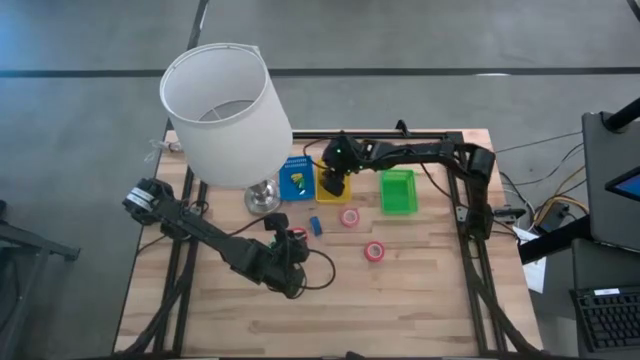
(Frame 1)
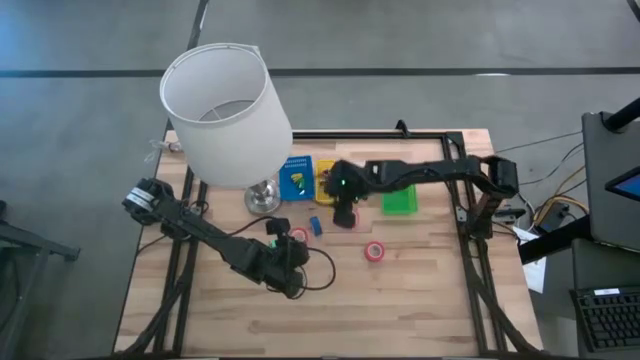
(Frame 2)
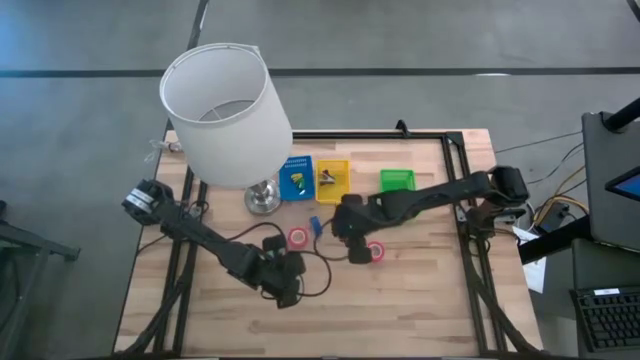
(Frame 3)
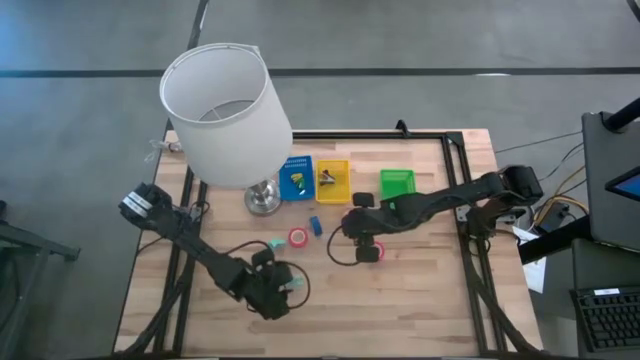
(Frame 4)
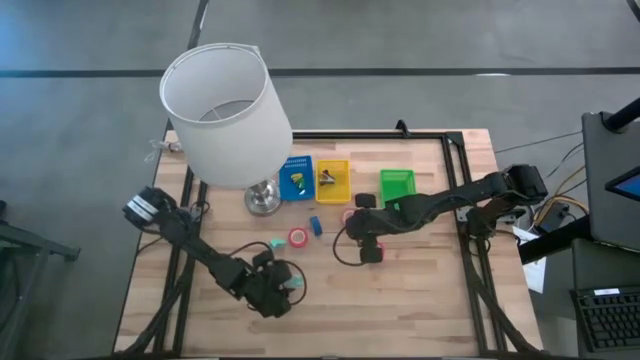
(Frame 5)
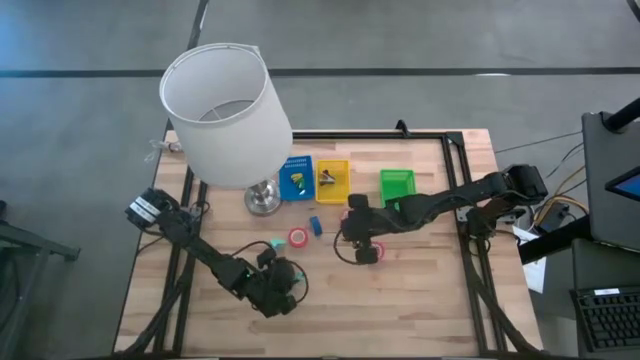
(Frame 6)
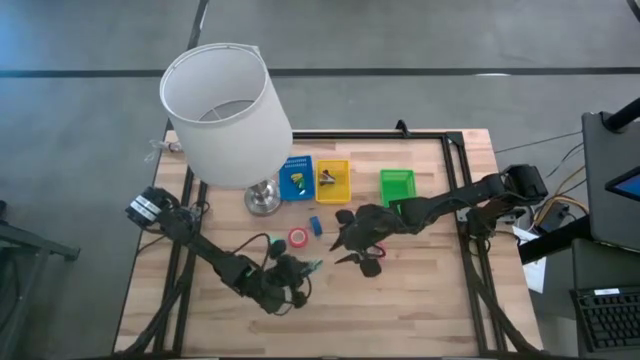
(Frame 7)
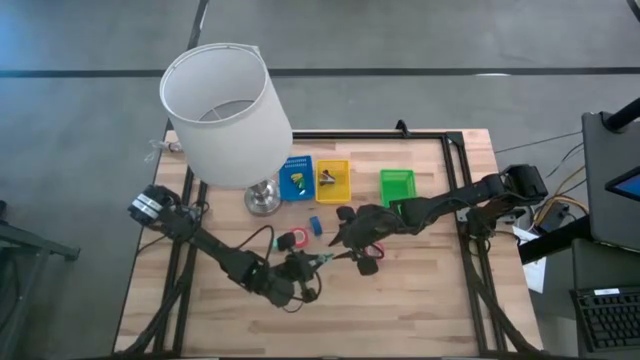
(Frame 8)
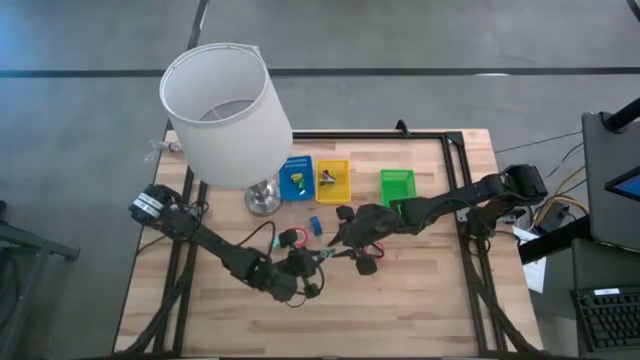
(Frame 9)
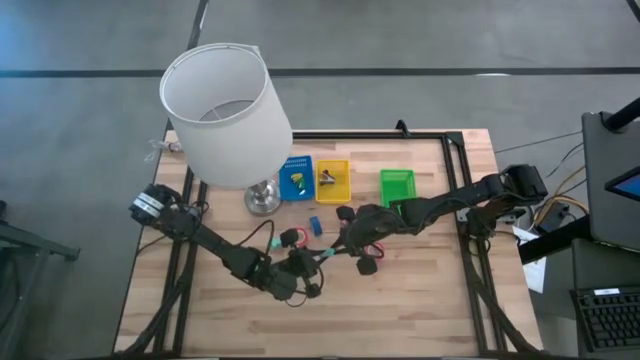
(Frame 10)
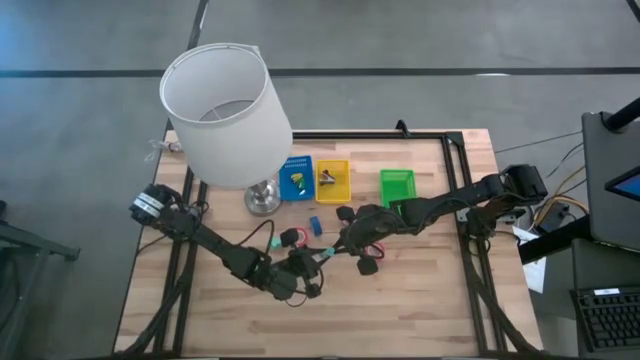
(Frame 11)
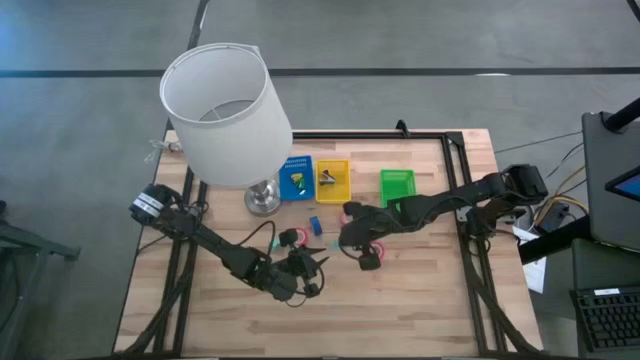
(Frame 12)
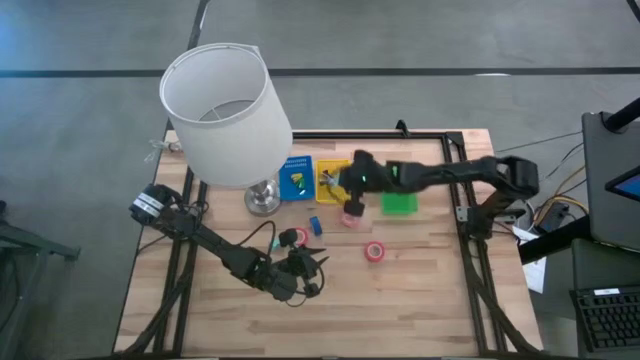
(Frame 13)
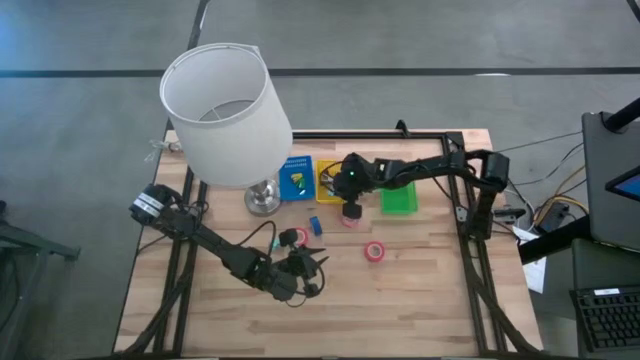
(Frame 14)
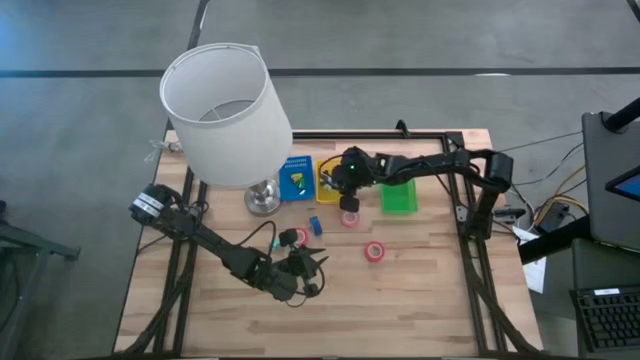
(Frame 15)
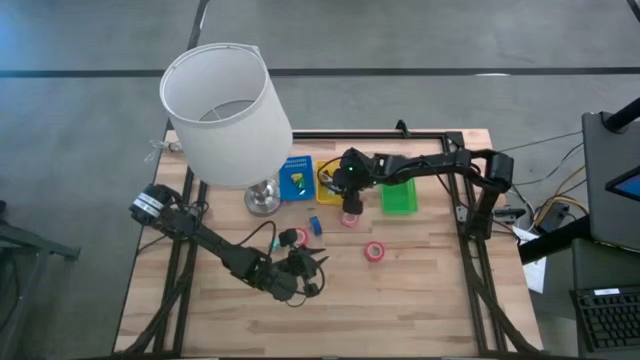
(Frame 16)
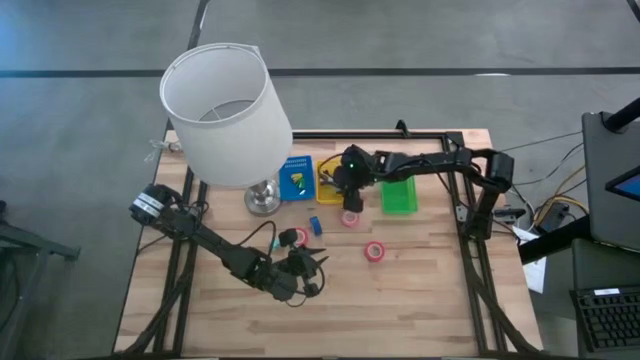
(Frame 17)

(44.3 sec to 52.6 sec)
Task: Pick and place Stapler, Stapler remover, tape
Put the bottom blue staple remover into the yellow bin

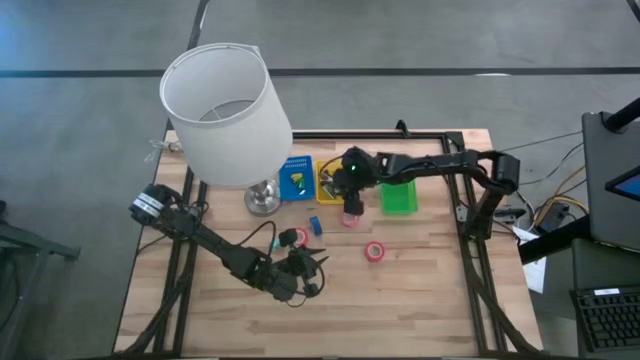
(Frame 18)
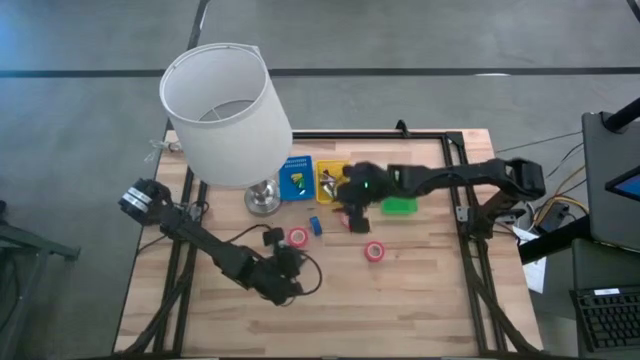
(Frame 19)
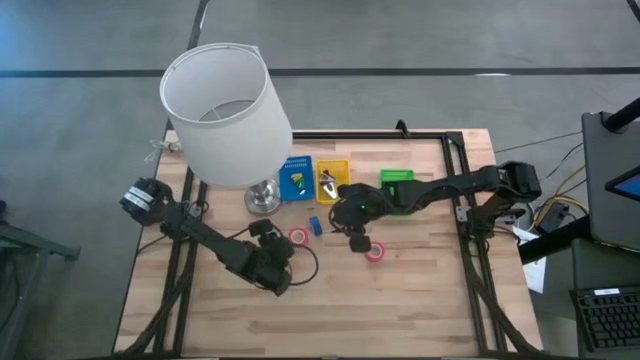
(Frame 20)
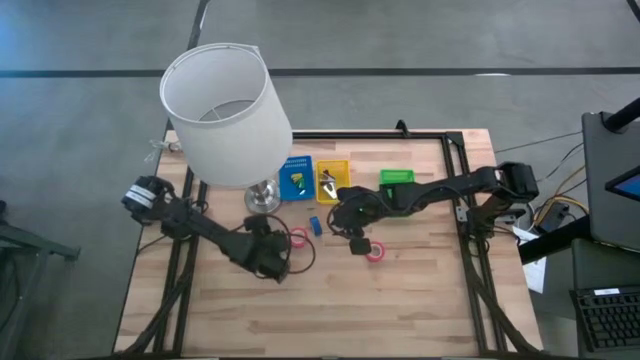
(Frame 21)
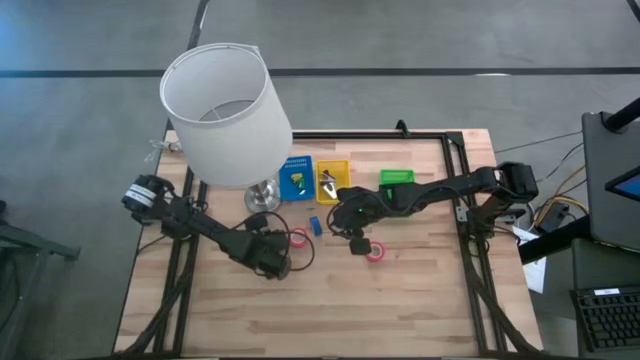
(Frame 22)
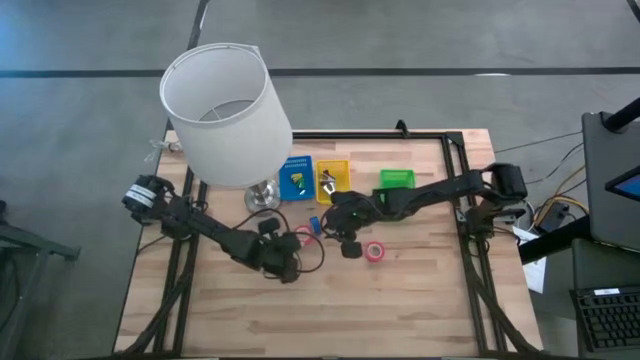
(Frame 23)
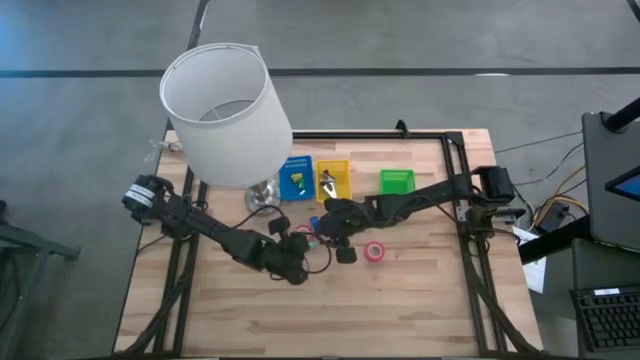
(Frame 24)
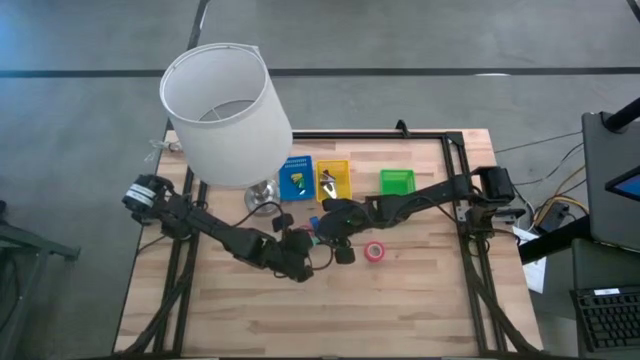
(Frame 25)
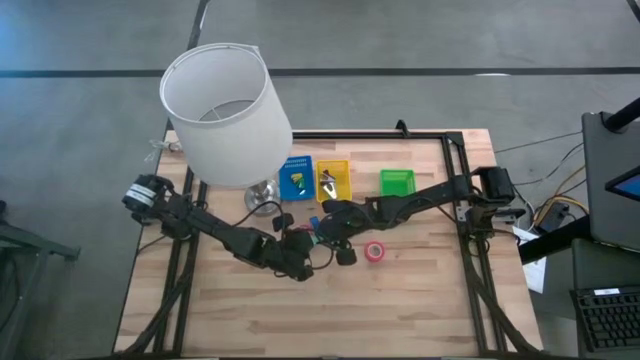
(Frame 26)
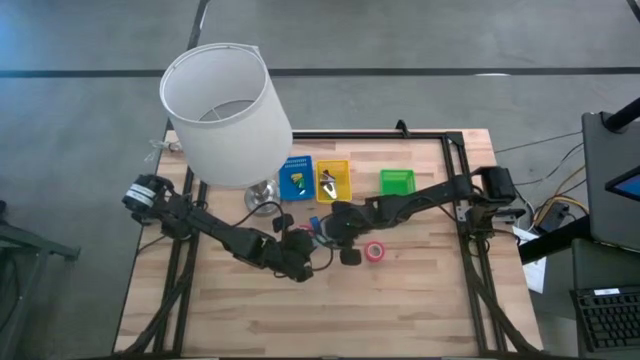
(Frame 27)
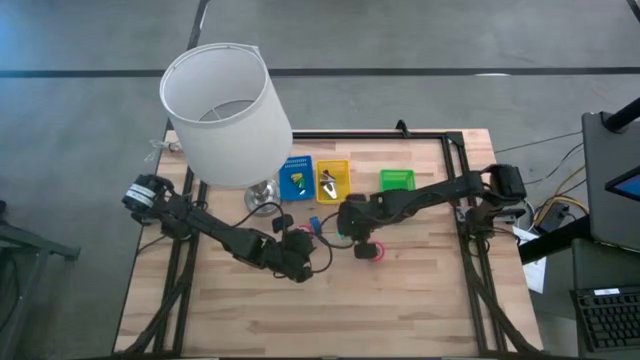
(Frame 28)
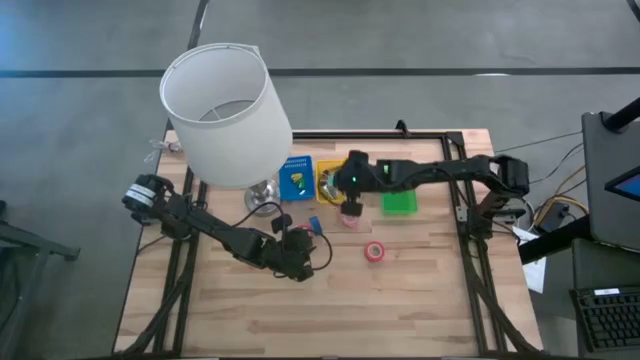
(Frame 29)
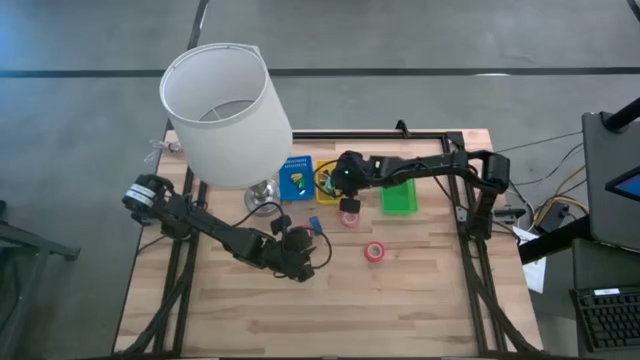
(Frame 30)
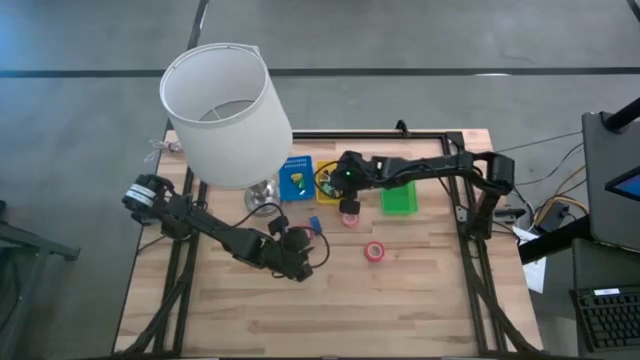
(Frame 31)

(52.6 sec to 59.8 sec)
Put the blue staple remover into the yellow bin

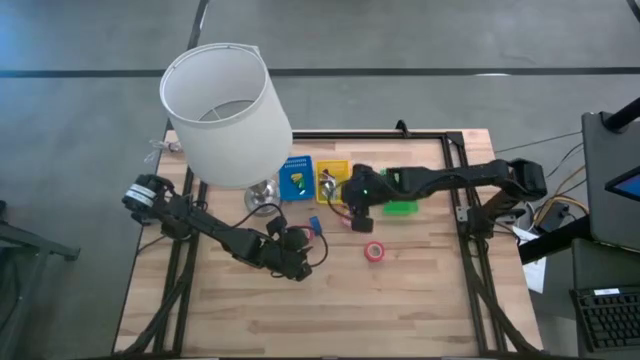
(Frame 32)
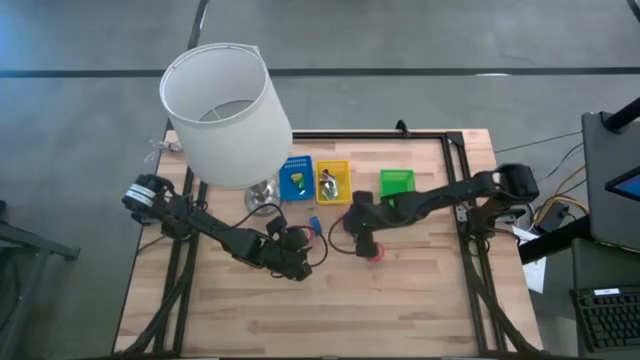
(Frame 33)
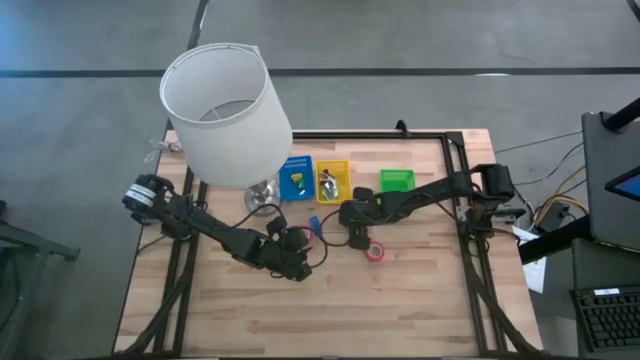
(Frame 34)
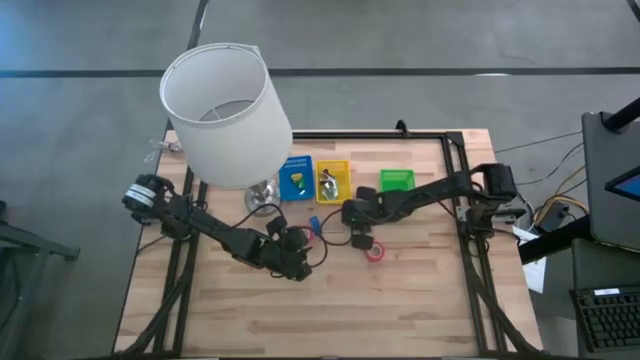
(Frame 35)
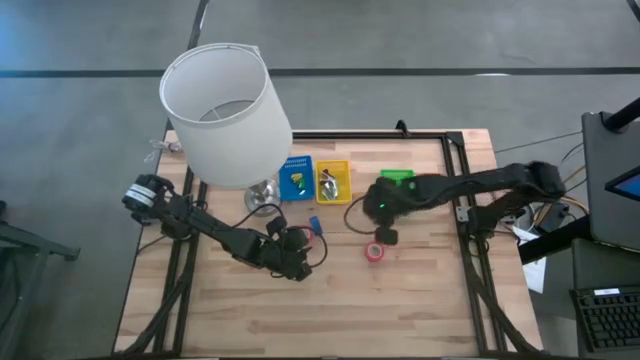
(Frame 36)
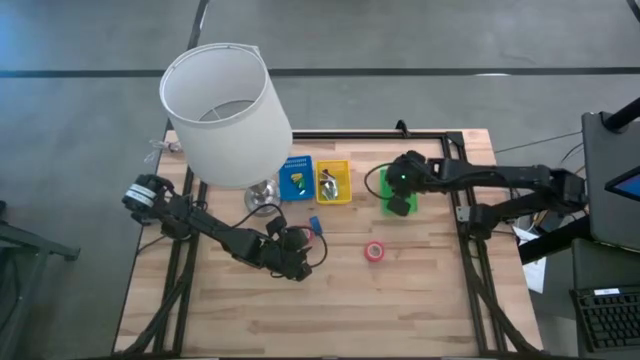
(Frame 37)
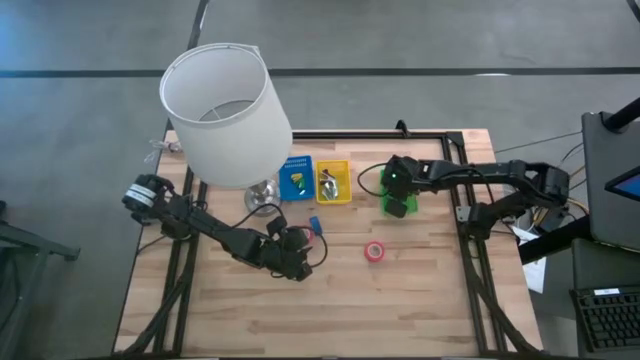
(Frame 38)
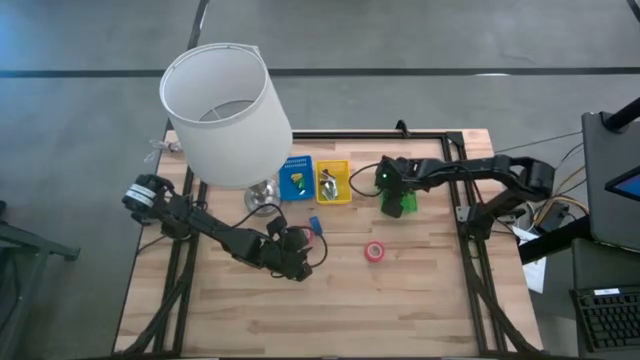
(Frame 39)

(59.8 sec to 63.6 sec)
Put the pink tape into the green bin

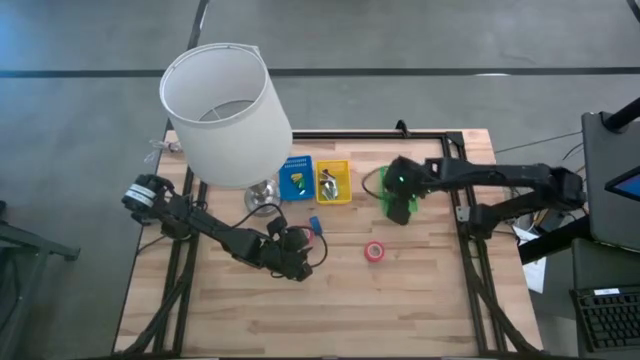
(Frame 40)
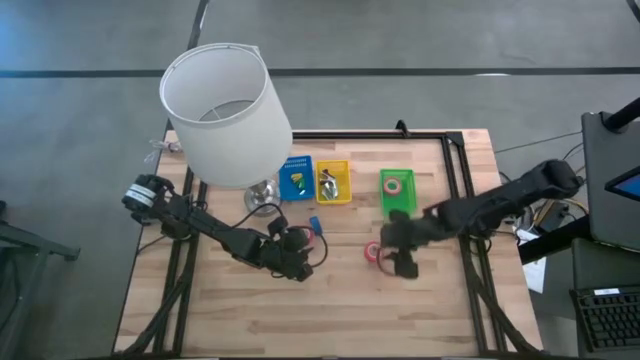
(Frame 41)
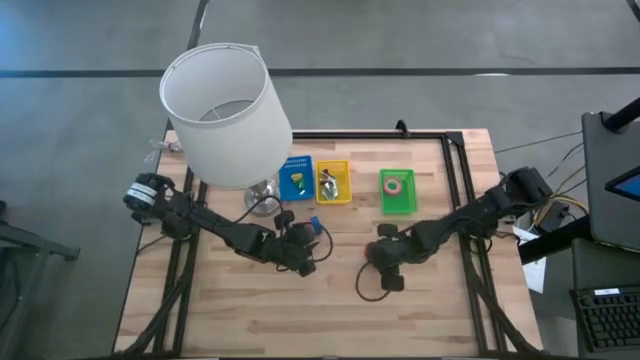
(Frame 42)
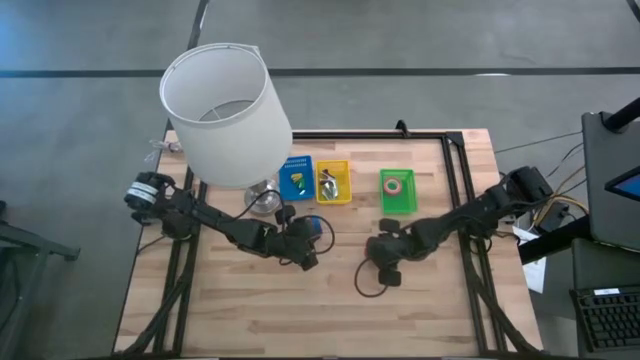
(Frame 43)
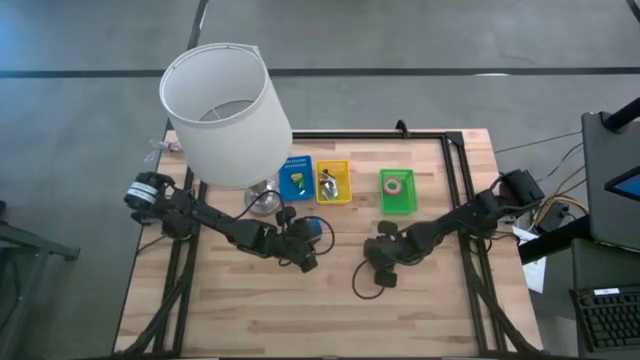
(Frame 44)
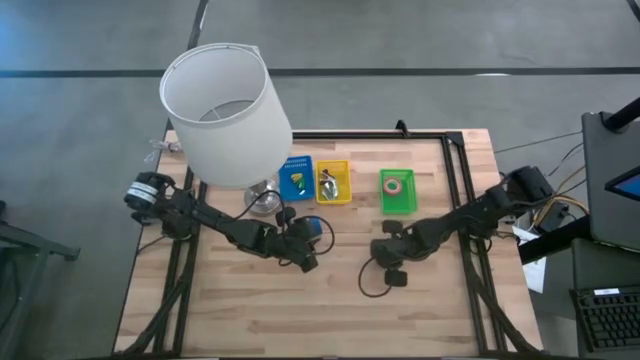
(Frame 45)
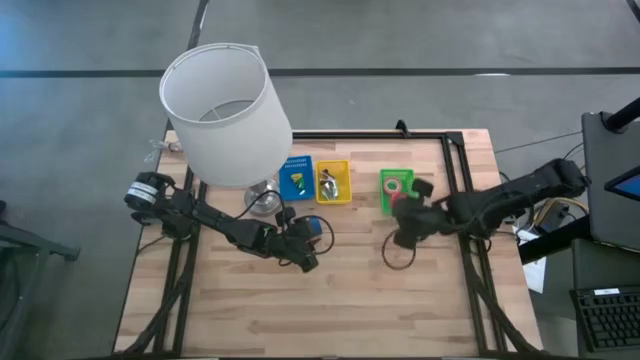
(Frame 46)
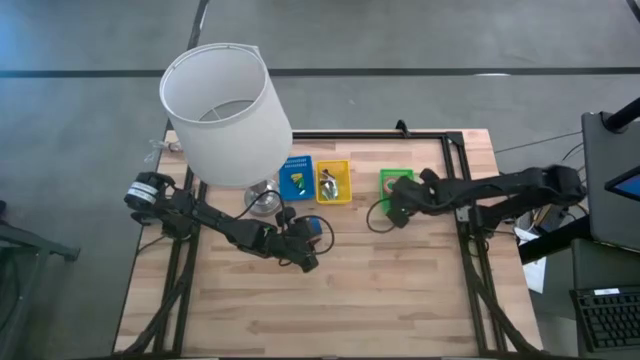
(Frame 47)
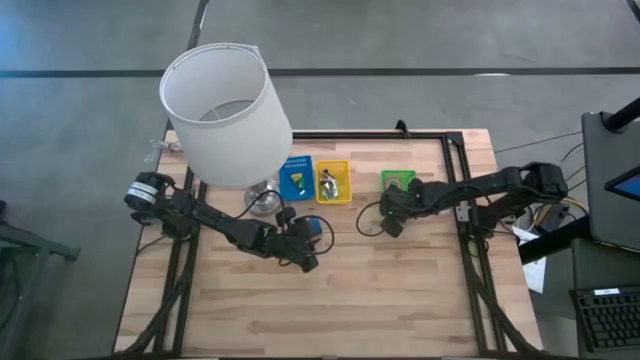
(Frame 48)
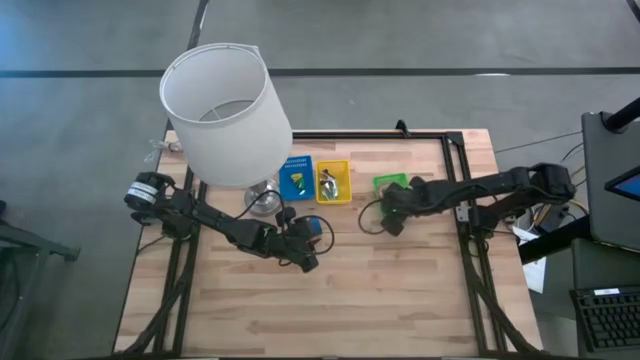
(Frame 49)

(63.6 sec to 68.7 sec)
Put the right red tape into the green bin
